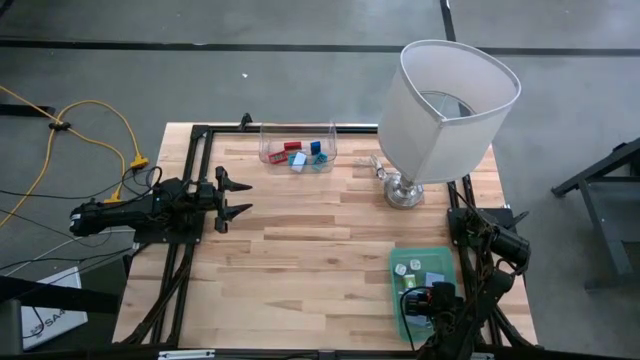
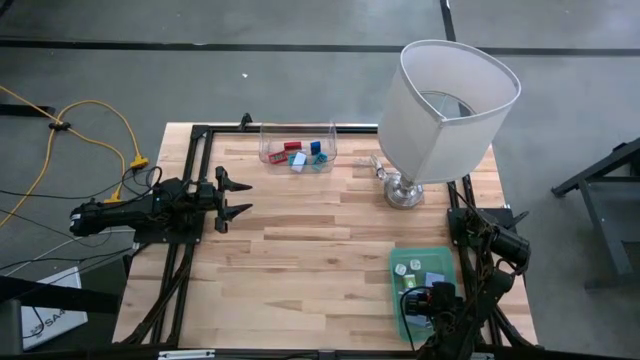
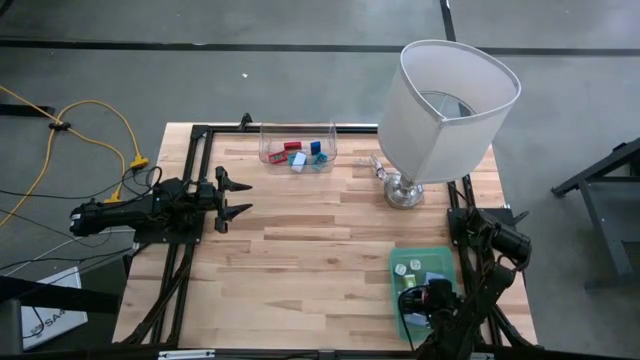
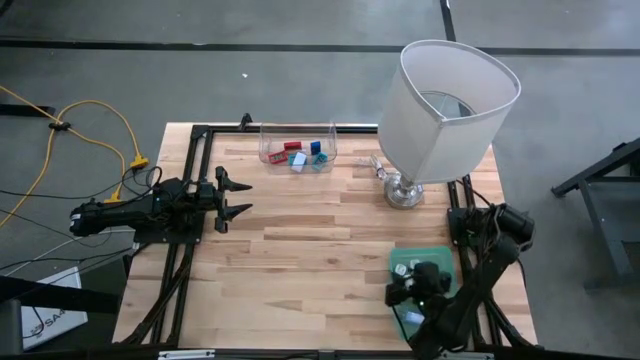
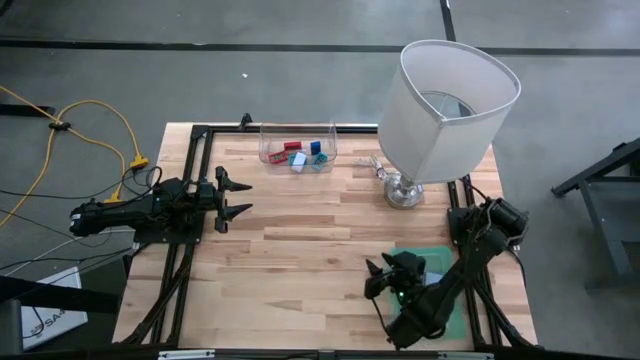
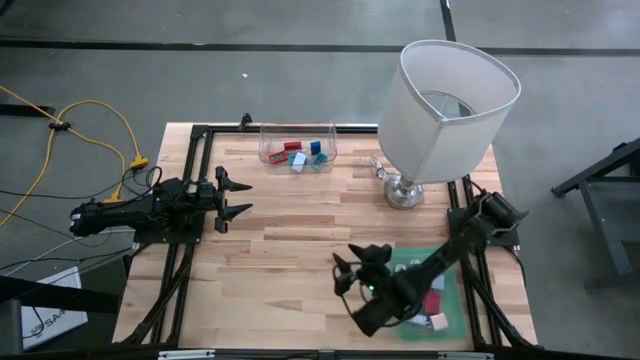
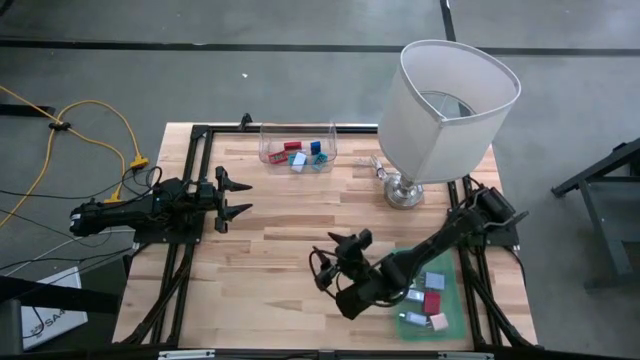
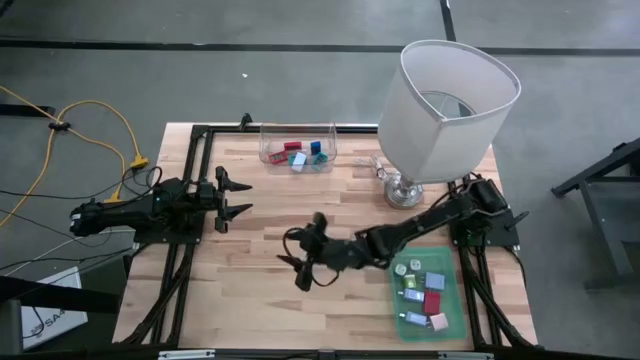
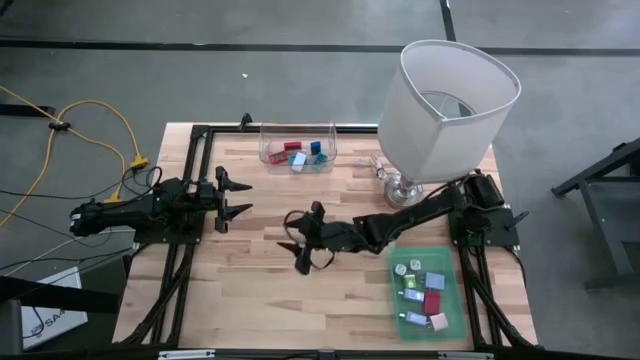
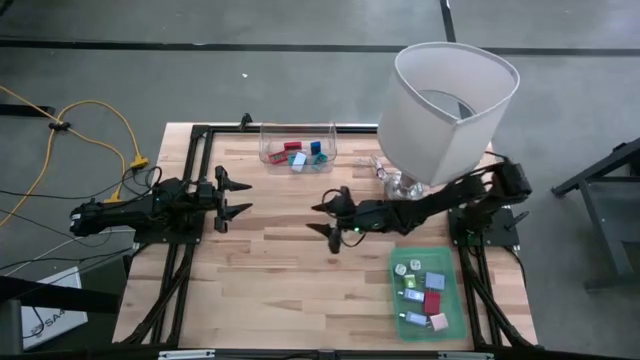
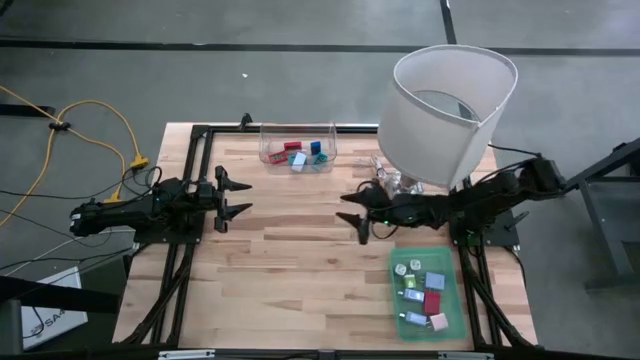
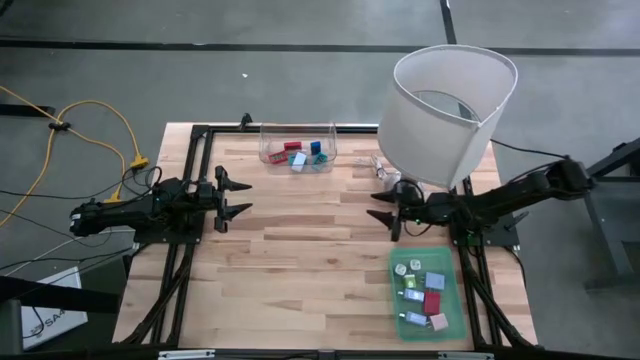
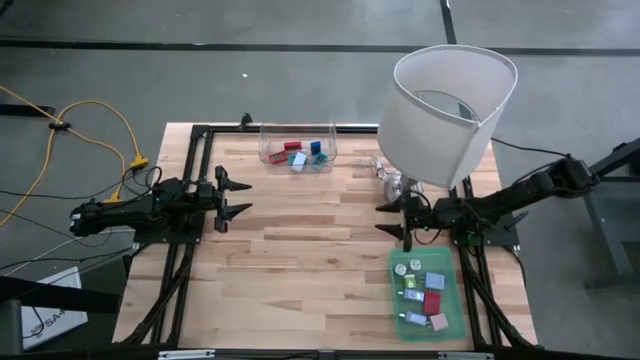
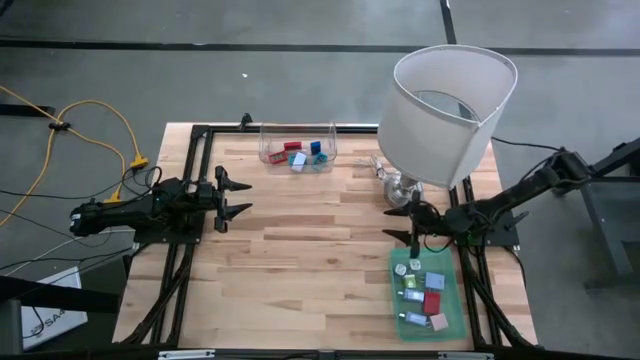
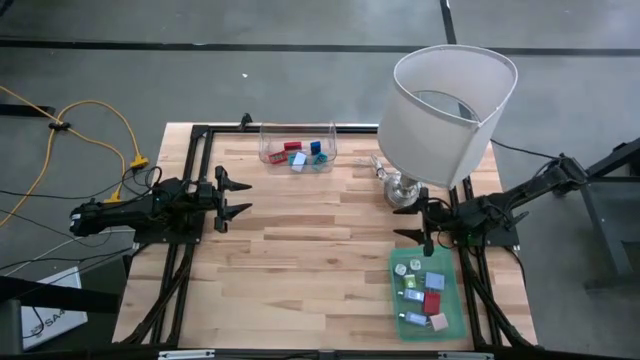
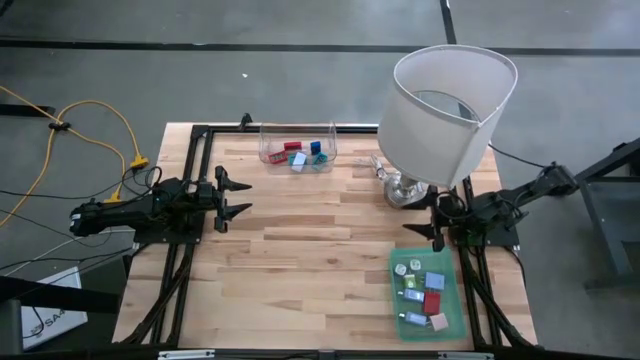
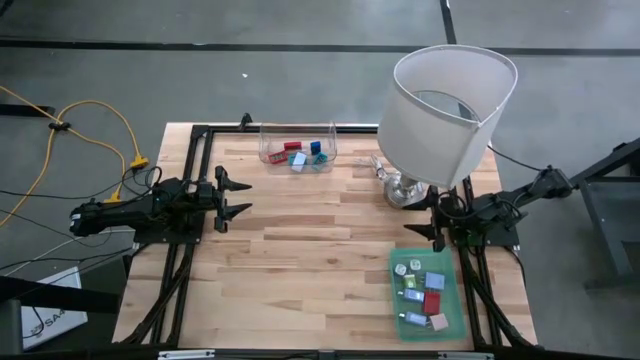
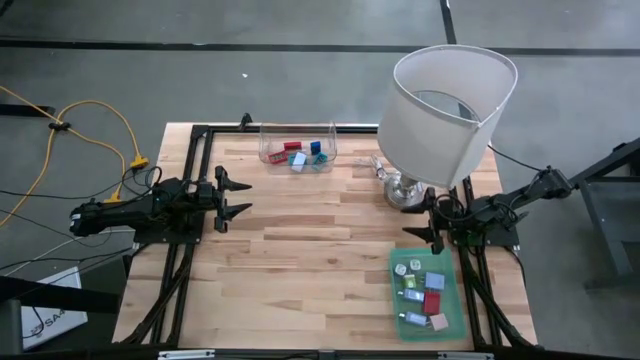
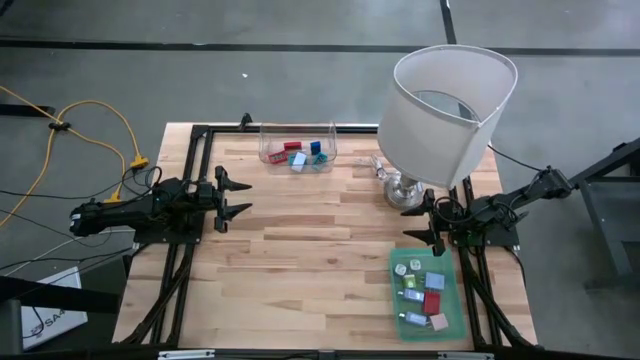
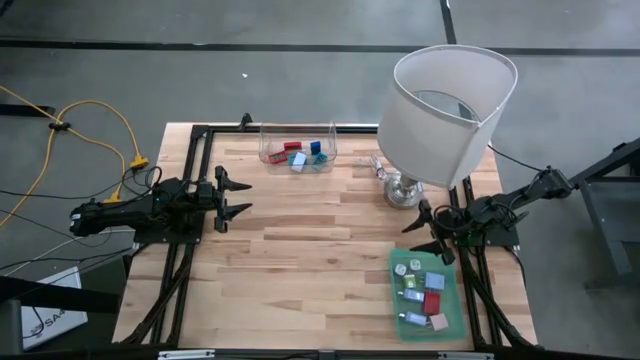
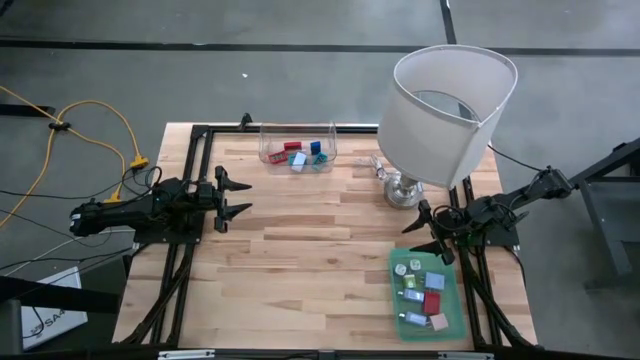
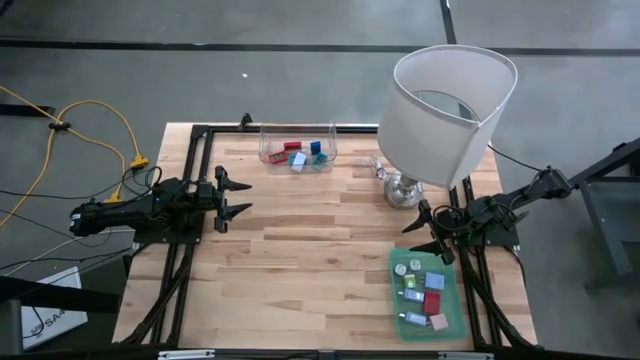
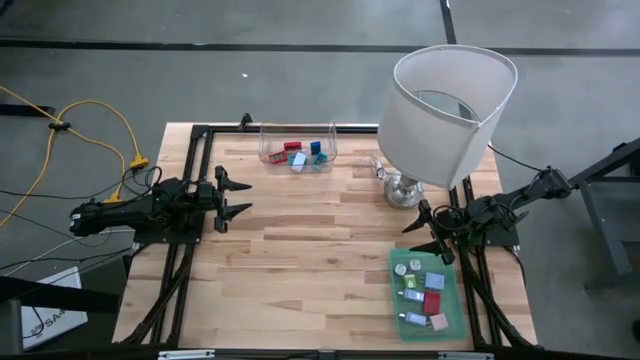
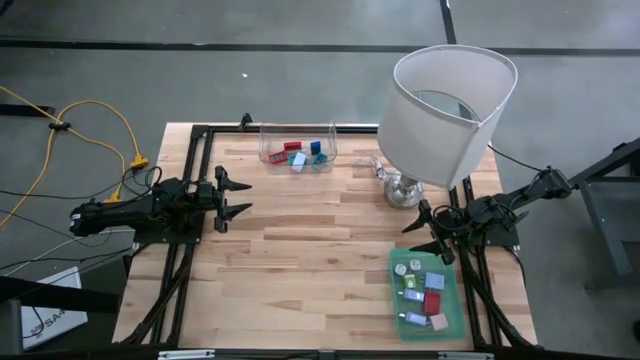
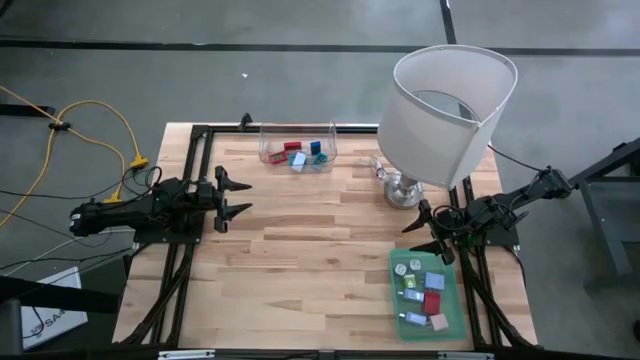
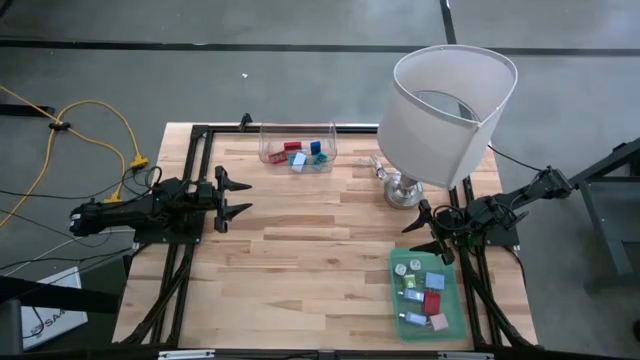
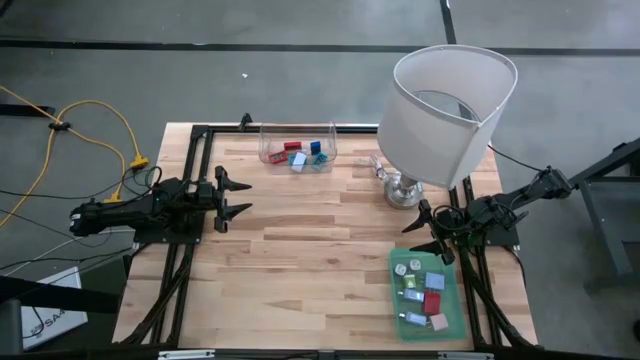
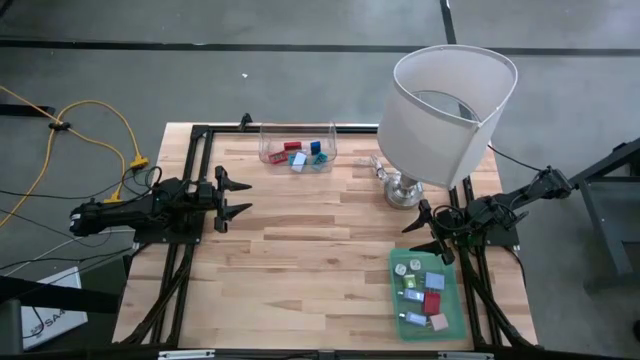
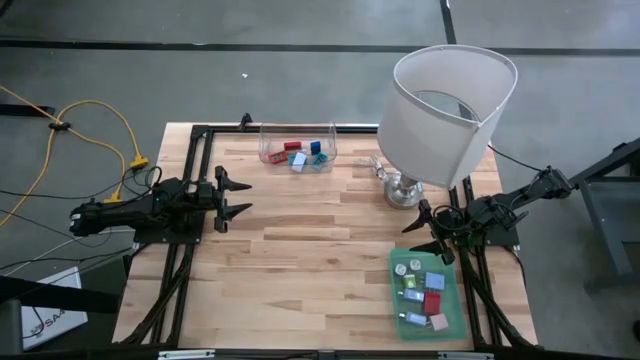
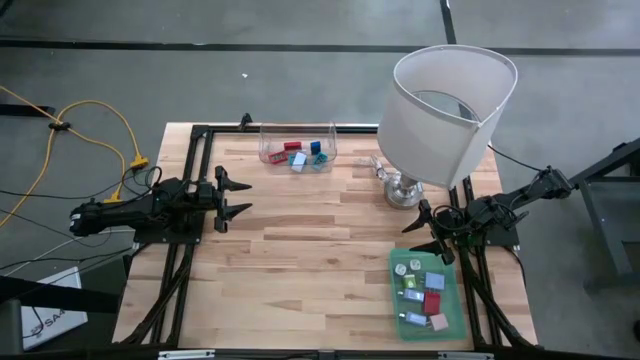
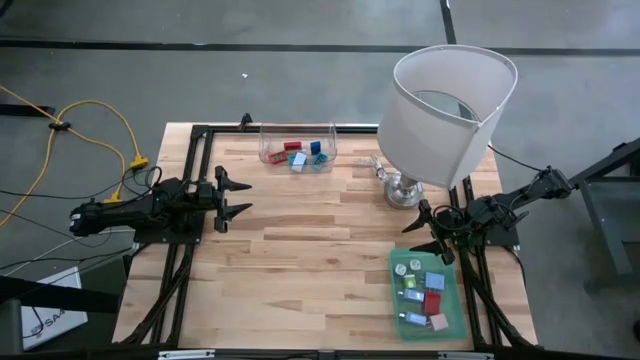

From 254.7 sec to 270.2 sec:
Task: Pick & Place Office items
Return to Home Position

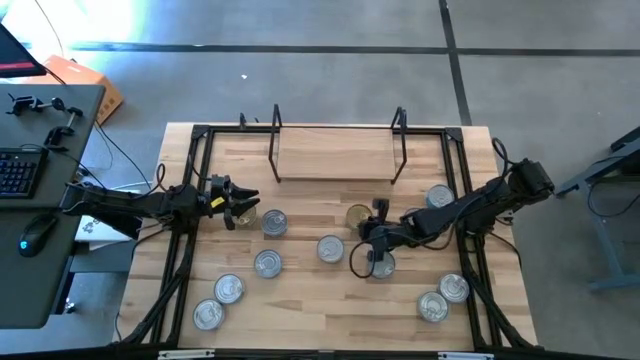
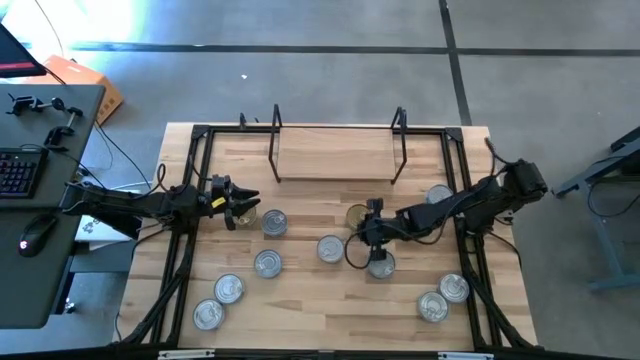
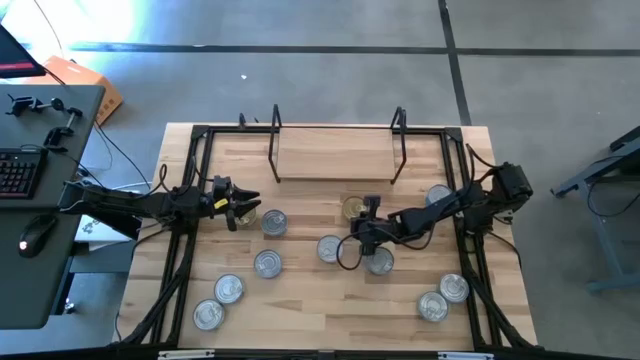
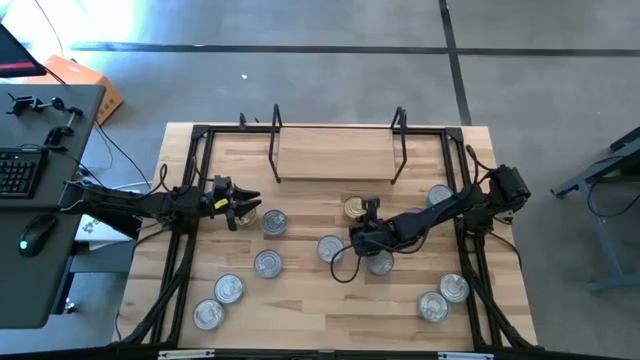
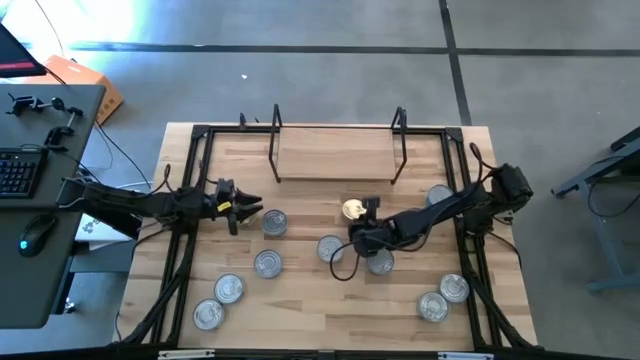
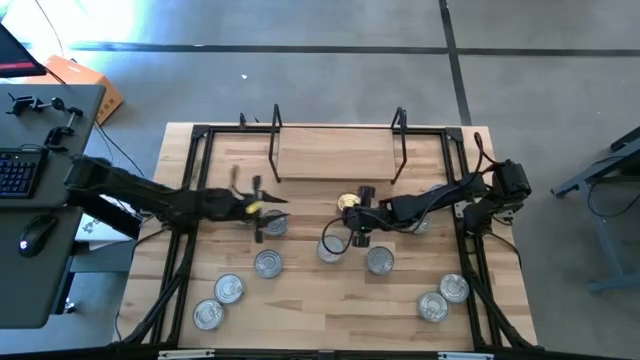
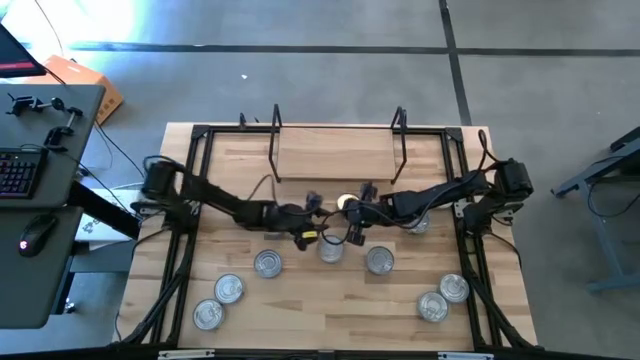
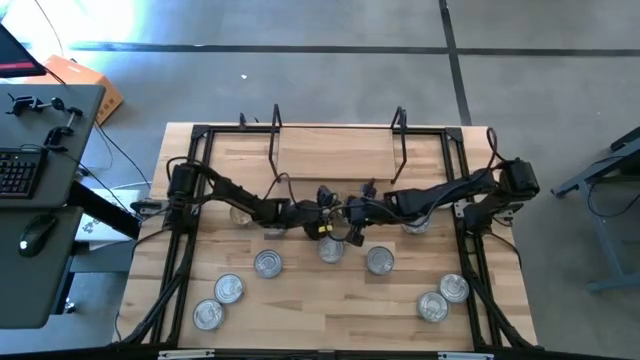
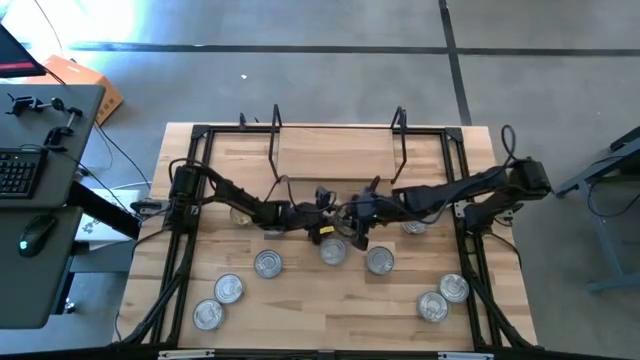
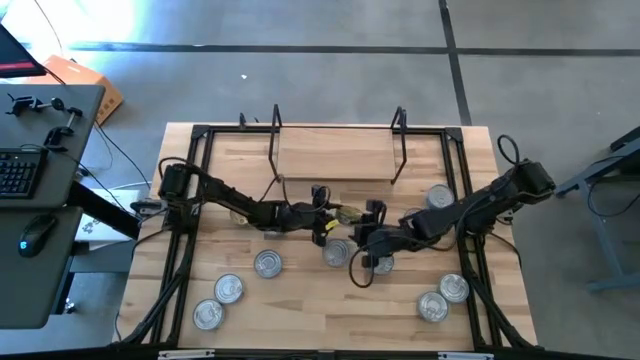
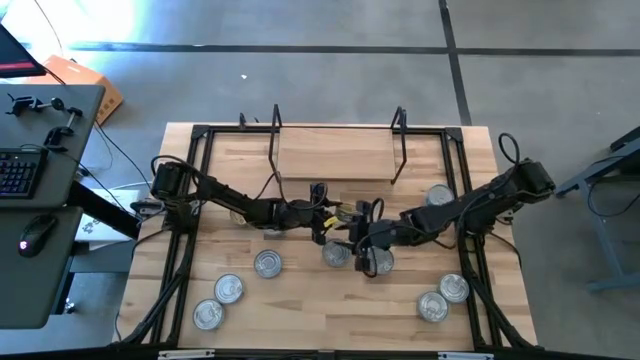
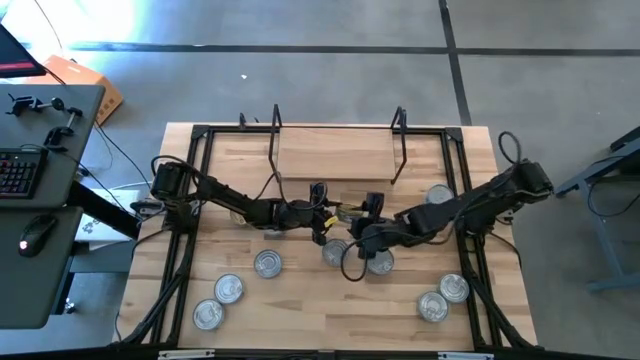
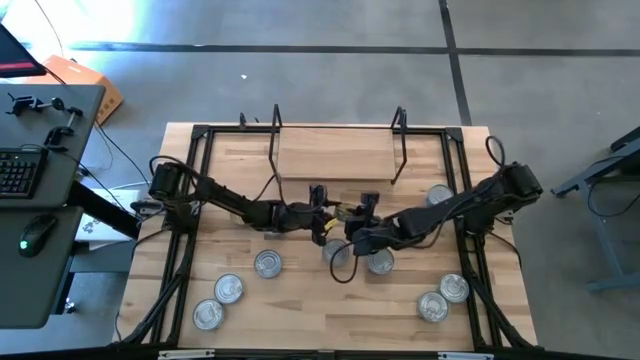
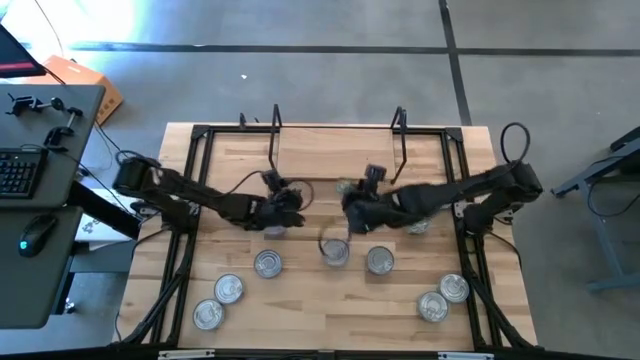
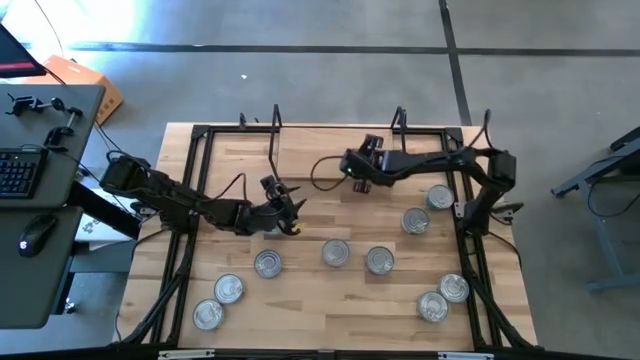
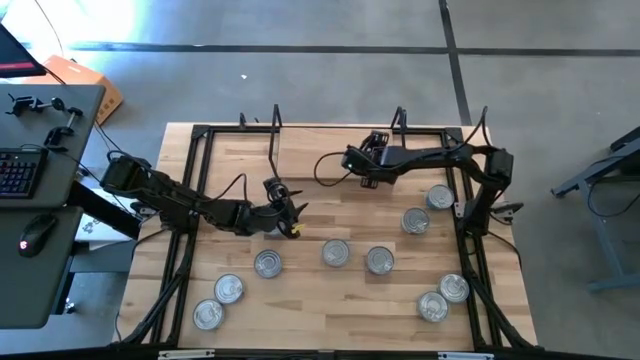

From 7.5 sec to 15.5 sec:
Task: Stack canned seafood by type on shelf
Put the green tuna can on the shelf
